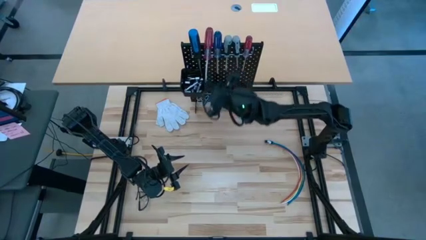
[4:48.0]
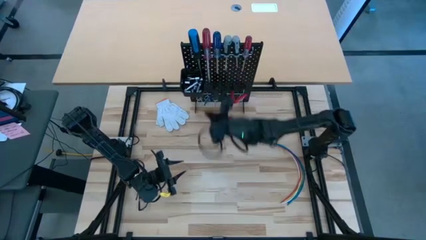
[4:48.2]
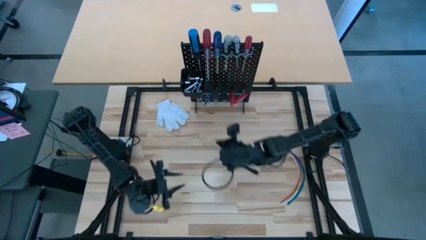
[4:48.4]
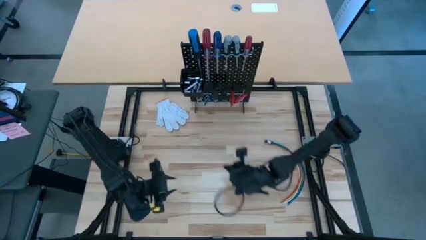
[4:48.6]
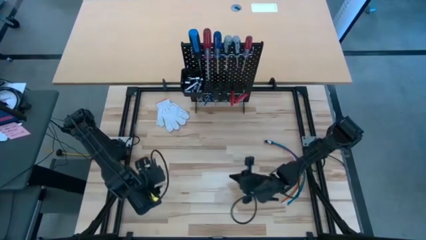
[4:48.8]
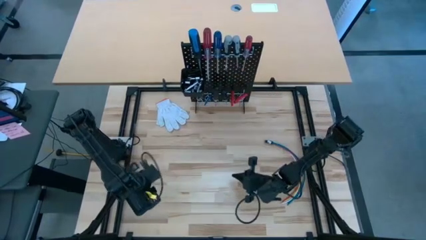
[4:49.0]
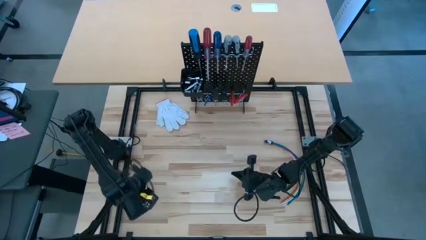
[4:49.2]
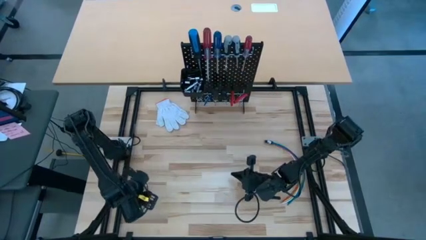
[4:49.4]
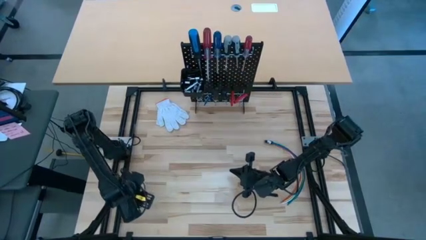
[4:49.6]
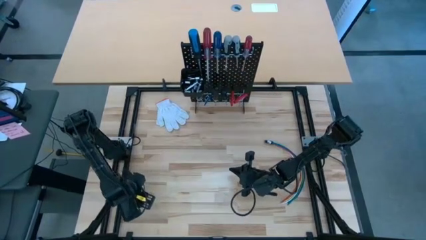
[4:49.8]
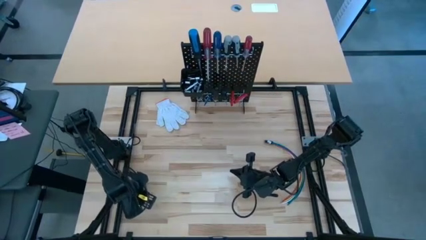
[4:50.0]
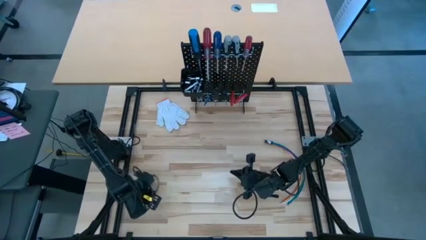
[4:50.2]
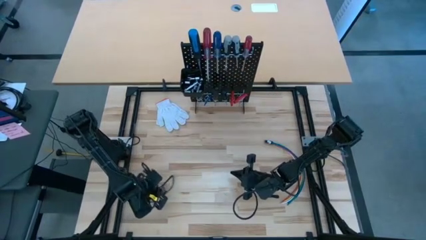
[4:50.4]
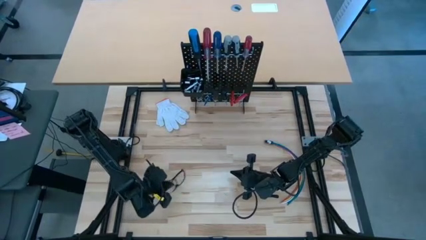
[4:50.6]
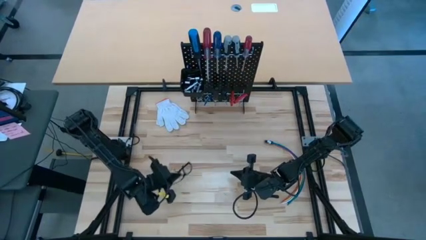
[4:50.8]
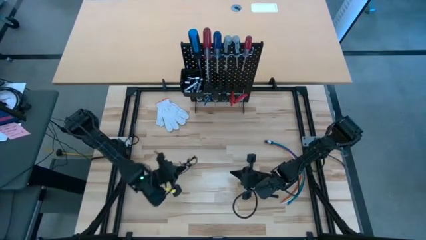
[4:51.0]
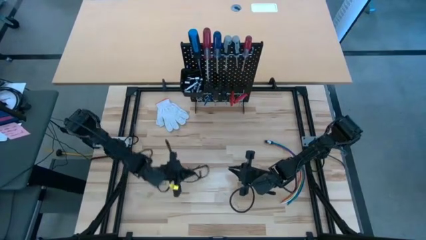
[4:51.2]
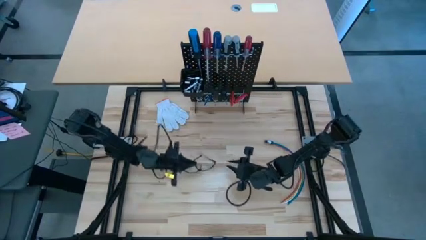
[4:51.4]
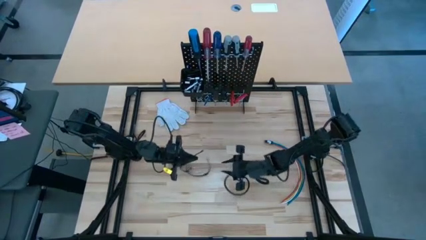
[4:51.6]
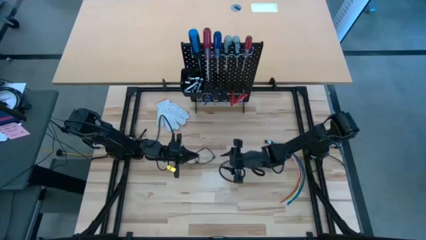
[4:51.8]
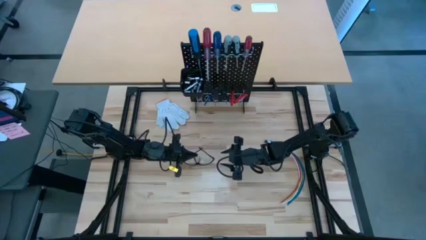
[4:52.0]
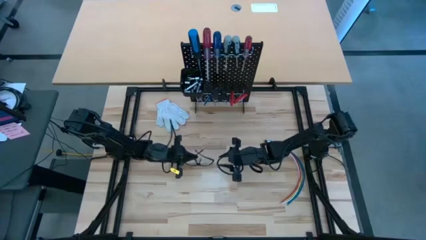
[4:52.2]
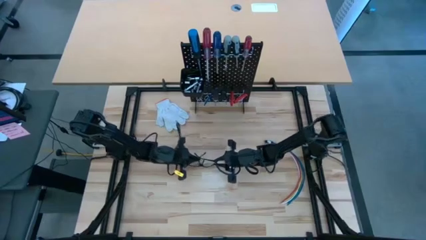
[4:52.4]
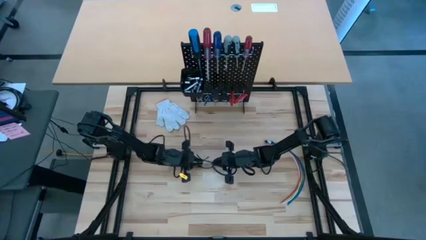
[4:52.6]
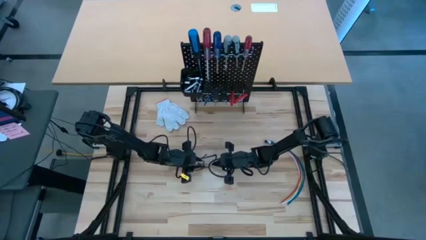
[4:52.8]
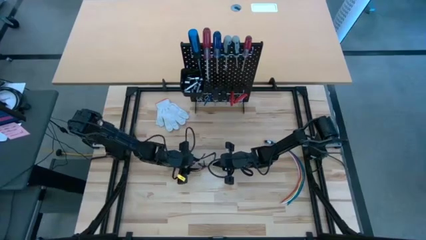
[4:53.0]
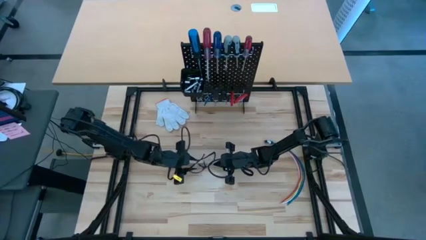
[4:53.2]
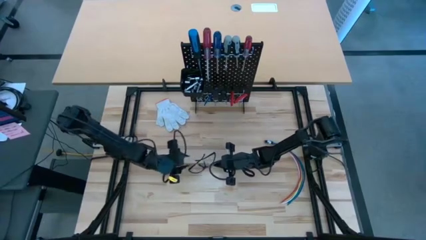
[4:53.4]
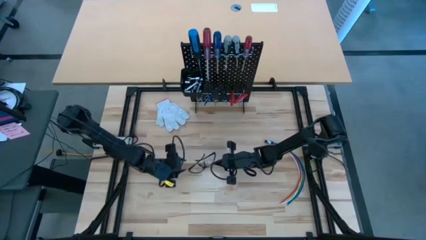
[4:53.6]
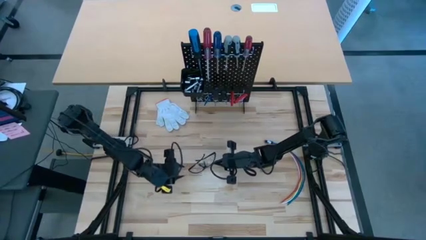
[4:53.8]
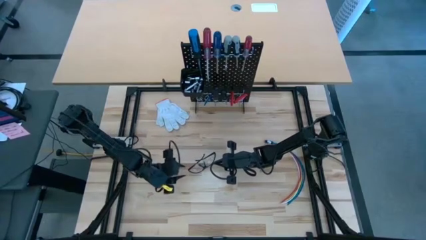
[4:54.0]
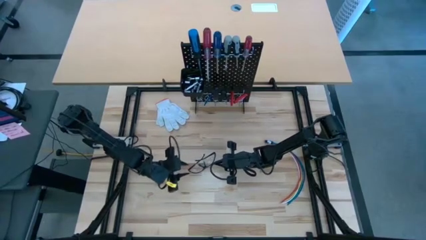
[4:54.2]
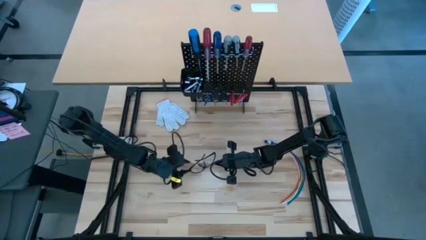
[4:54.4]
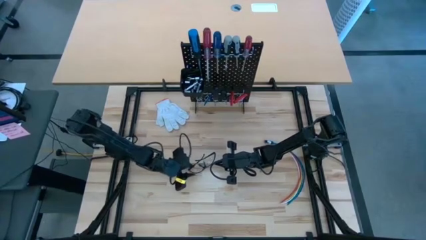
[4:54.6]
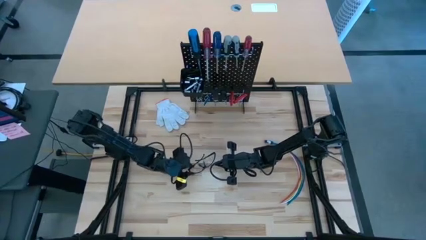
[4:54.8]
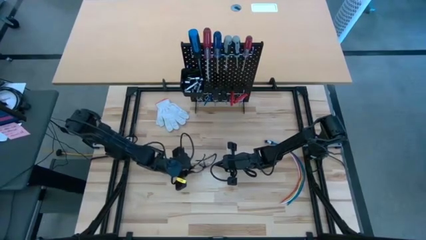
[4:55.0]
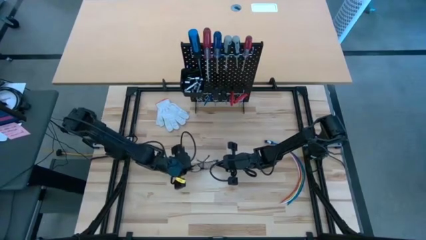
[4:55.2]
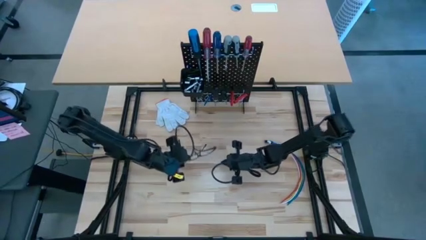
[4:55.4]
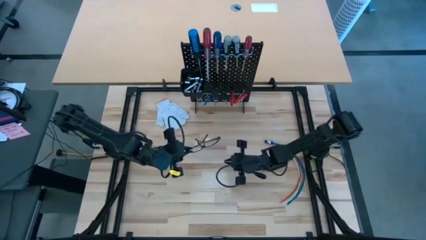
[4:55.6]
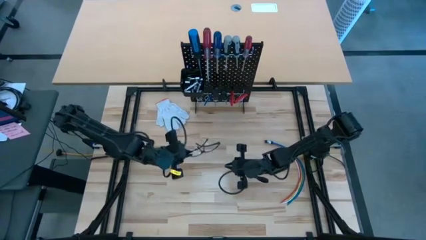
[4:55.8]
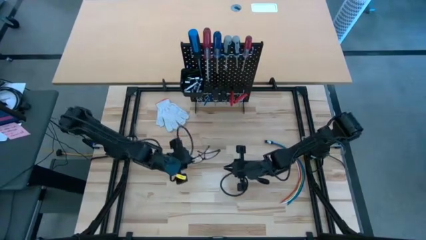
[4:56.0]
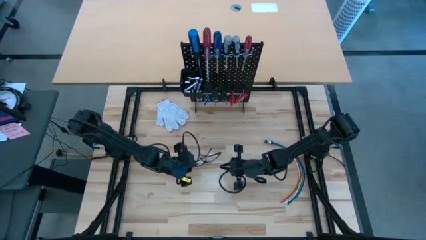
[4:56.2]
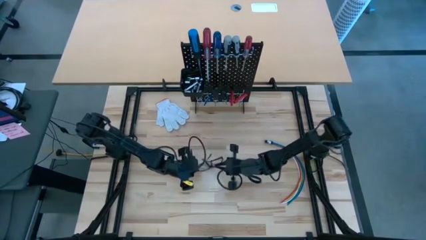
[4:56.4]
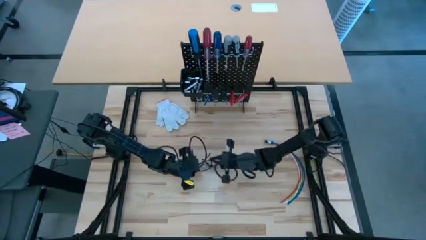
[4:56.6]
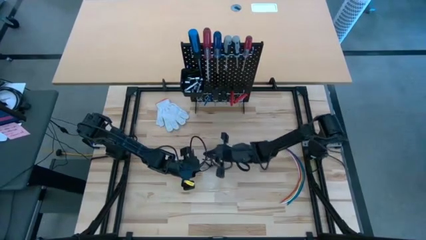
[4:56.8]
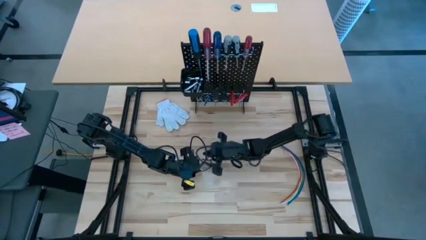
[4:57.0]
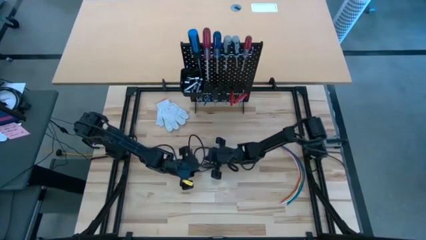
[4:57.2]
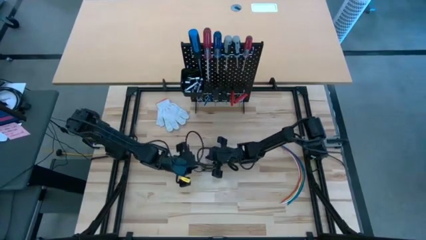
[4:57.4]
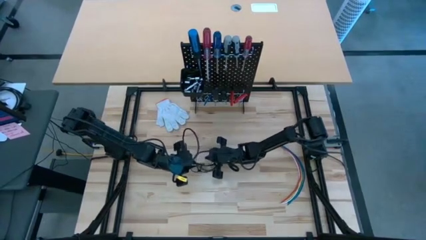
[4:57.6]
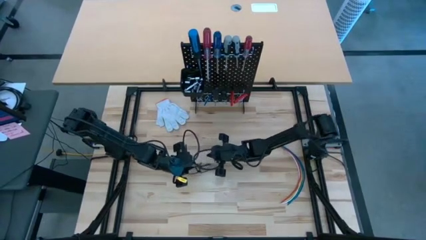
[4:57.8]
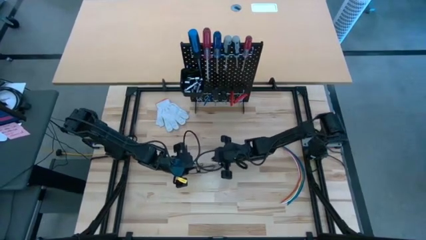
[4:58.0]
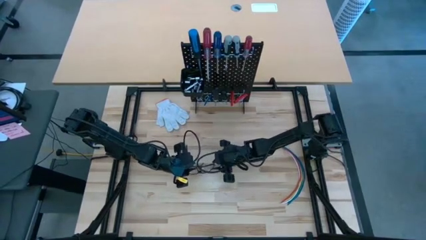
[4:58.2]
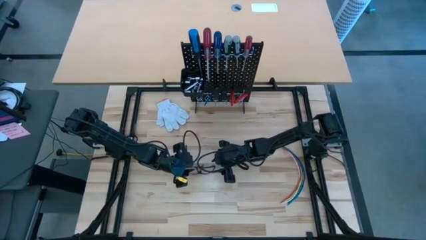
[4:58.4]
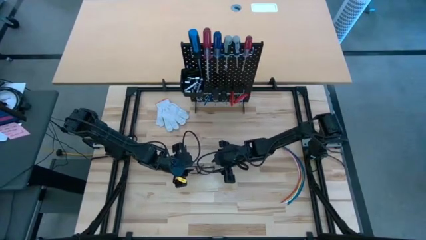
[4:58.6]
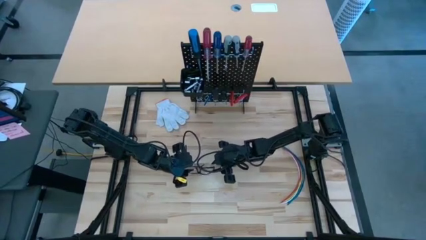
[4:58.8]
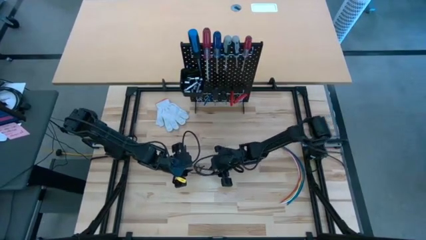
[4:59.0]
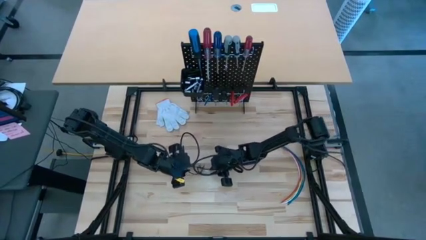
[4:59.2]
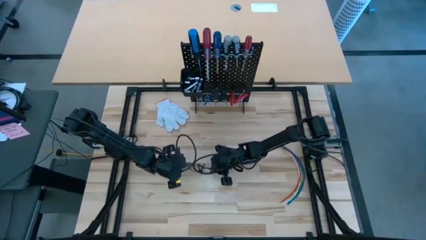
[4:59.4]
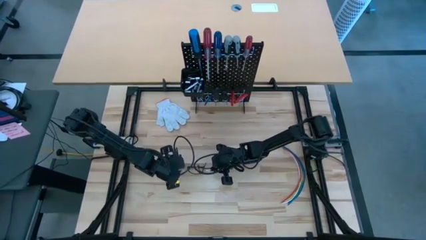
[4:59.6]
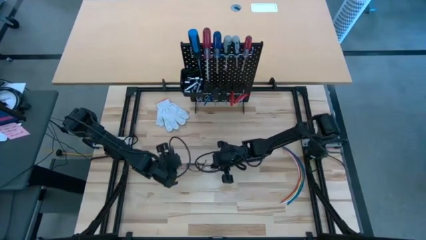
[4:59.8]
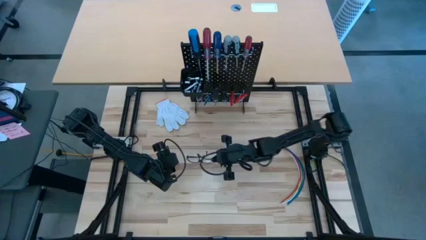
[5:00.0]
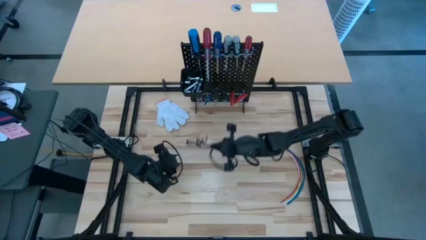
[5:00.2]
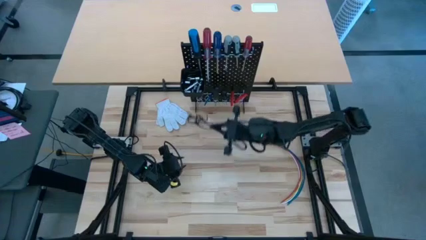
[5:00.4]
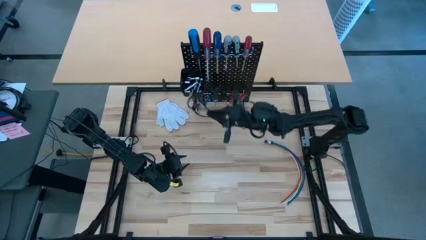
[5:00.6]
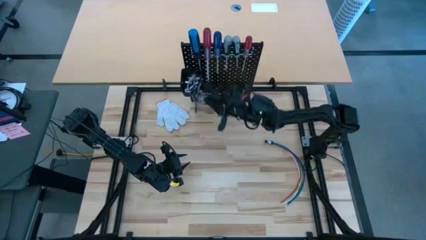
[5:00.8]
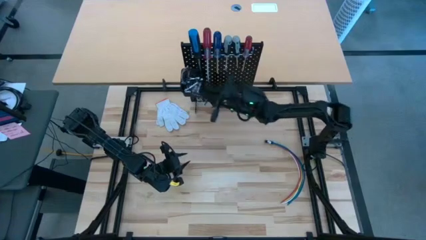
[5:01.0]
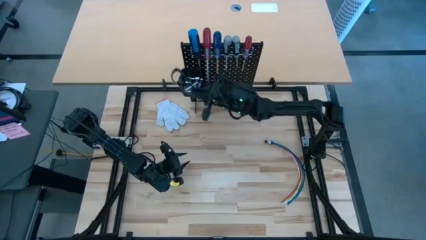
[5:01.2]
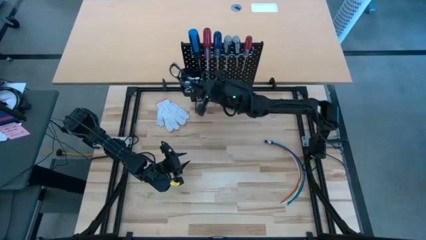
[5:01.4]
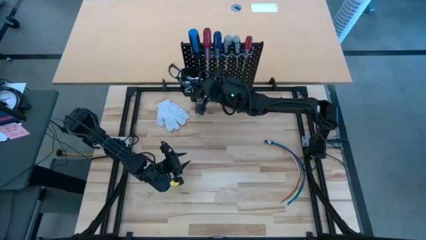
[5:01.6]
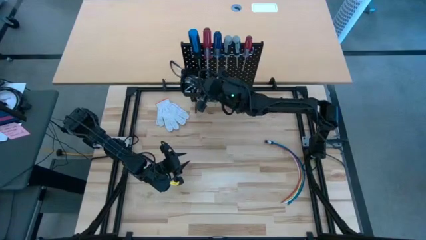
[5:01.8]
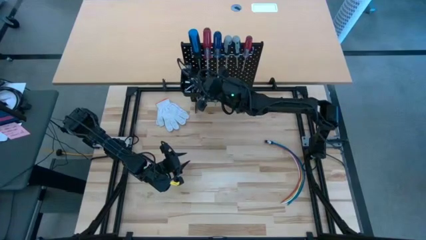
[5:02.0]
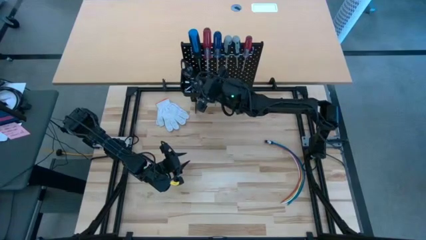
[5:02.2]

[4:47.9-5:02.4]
Task: Hang tools onto peg board
Put the safety glasses in the pegboard bin

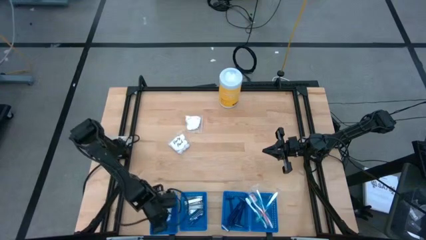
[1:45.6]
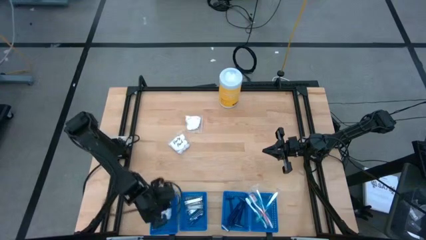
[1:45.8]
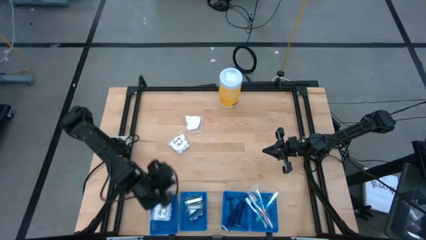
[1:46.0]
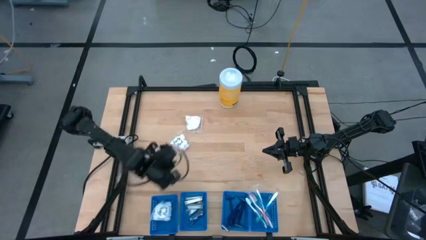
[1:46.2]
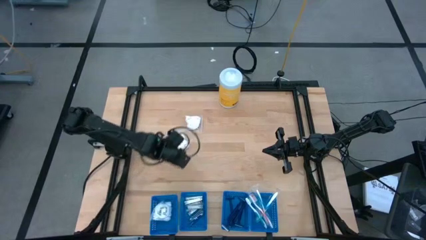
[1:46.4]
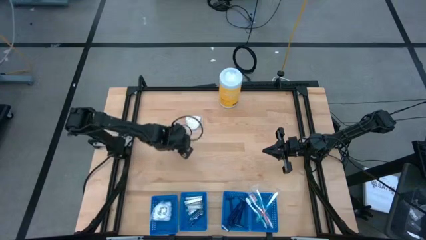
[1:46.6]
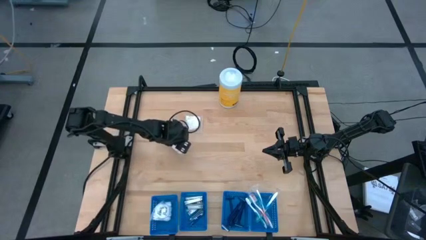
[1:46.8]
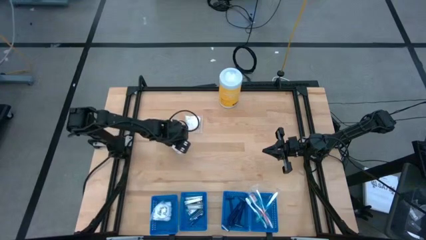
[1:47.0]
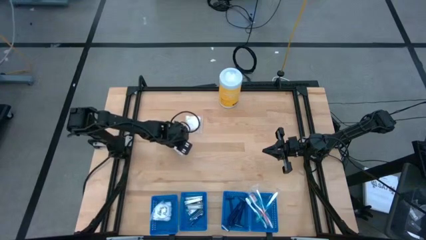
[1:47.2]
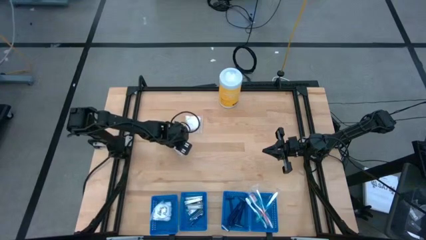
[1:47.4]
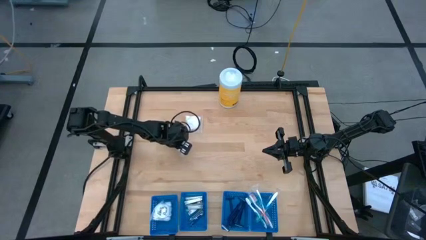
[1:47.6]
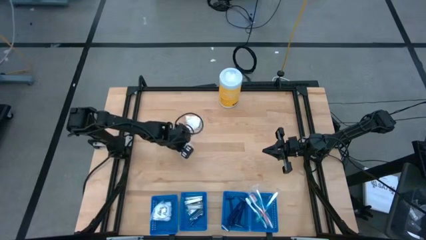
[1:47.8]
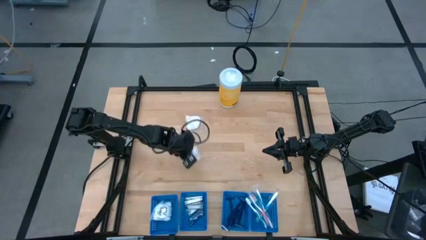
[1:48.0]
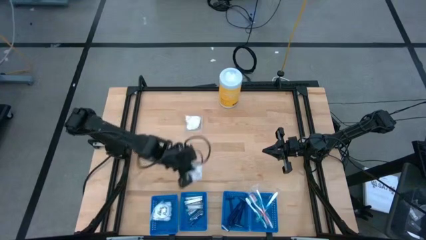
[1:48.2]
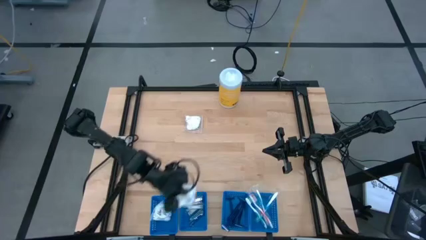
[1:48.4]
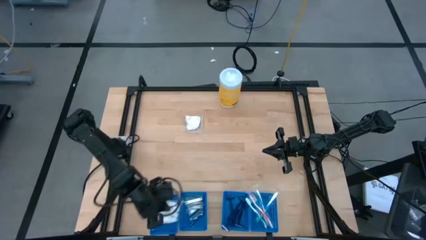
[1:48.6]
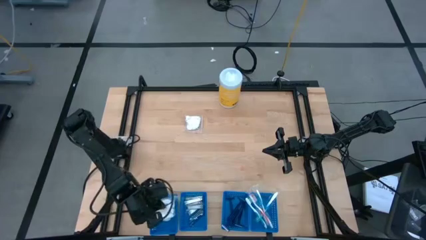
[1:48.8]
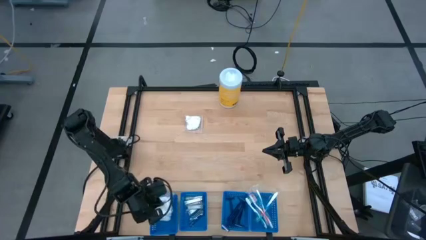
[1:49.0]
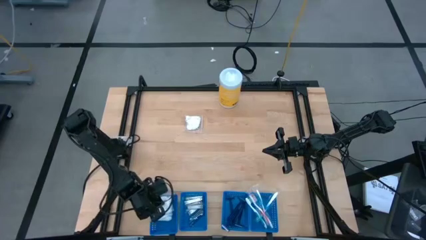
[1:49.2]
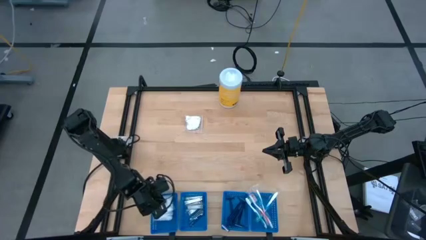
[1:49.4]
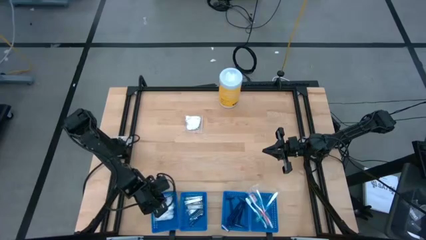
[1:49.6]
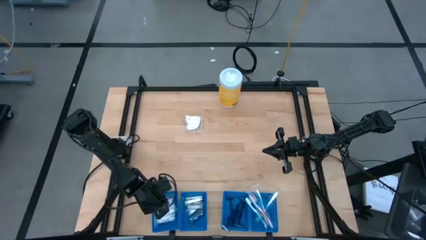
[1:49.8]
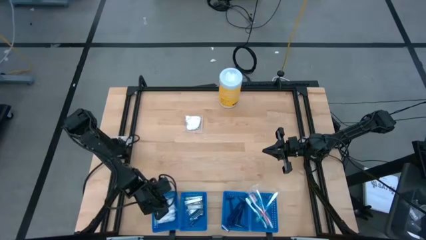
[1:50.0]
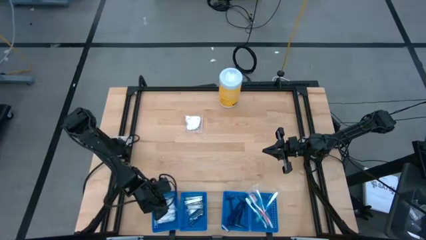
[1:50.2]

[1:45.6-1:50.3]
Task: Pick & Place Travel size toiletries
Put the bottom white cotton pack into the blue basket
